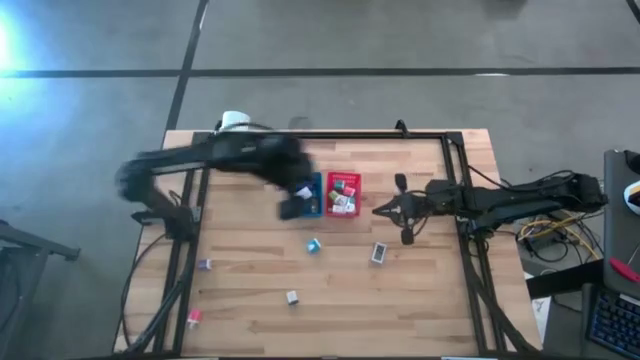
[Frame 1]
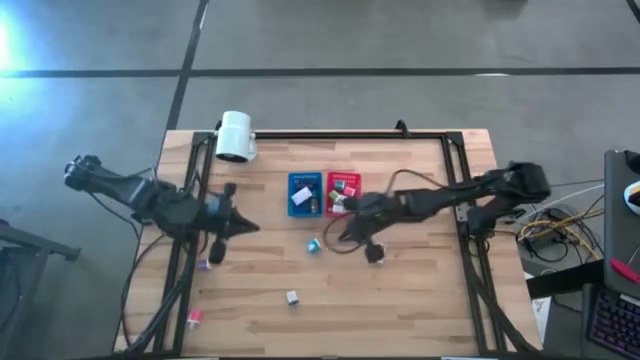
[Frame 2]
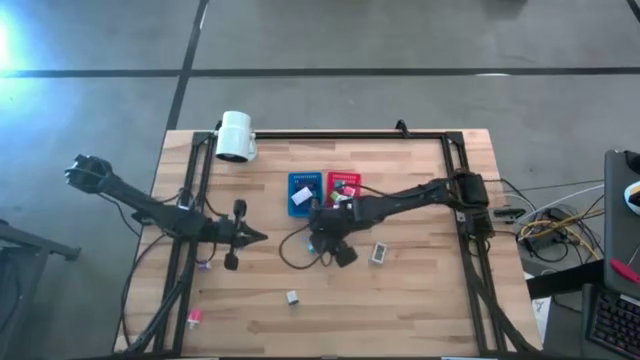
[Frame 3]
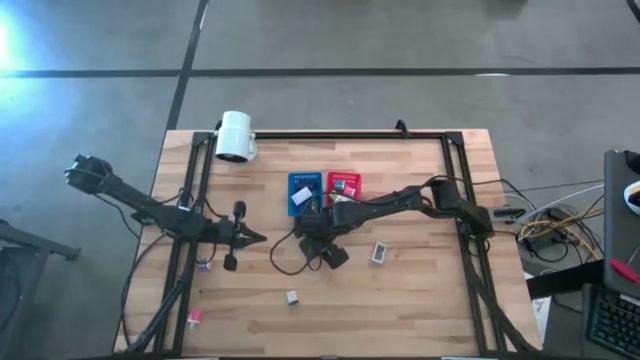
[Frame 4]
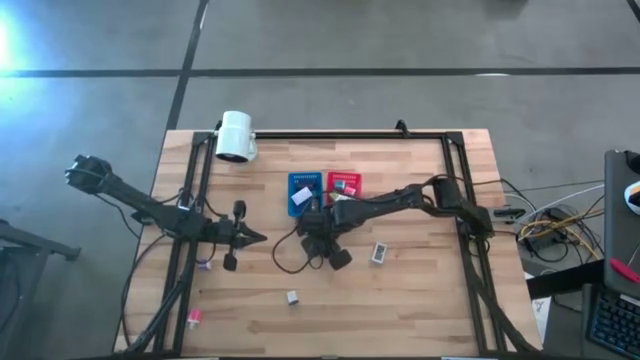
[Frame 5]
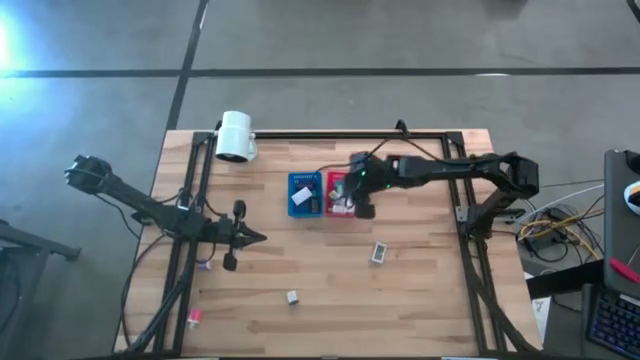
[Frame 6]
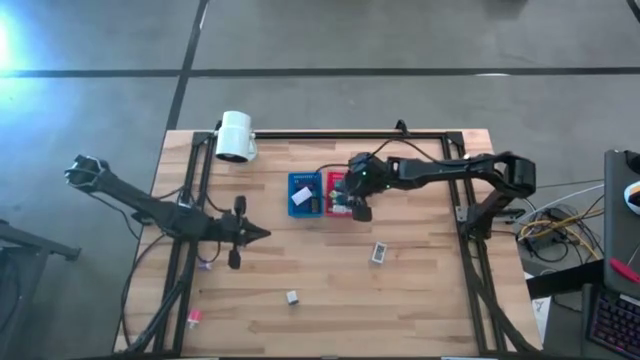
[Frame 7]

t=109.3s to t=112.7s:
Task: Pick & Place Office items
Put the light blue charger adapter into the red bin

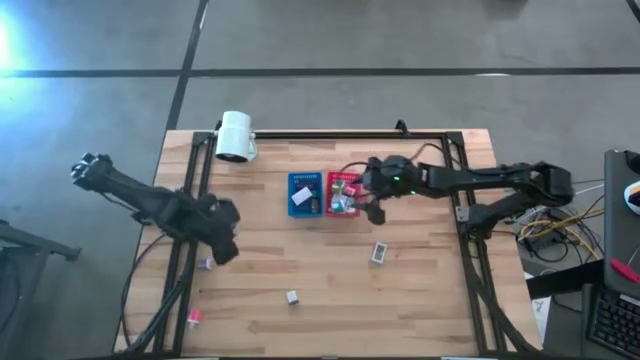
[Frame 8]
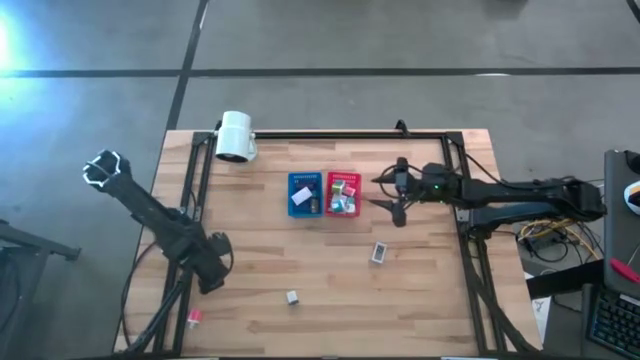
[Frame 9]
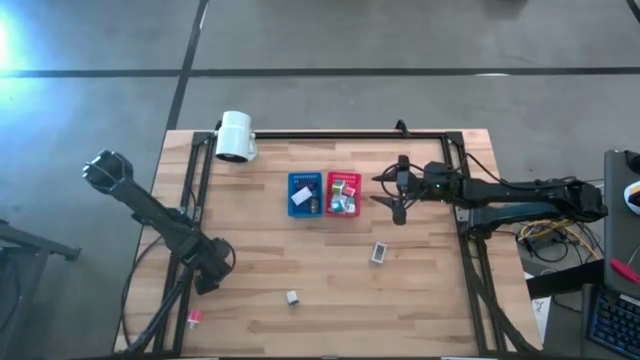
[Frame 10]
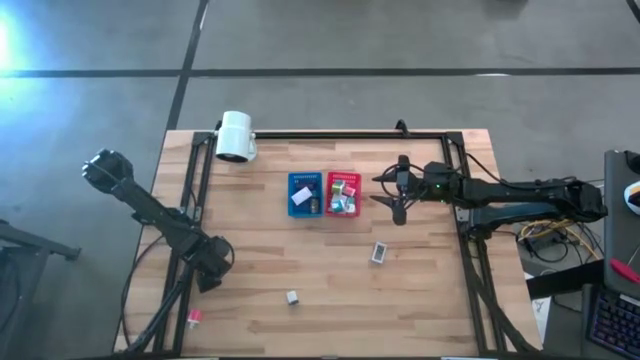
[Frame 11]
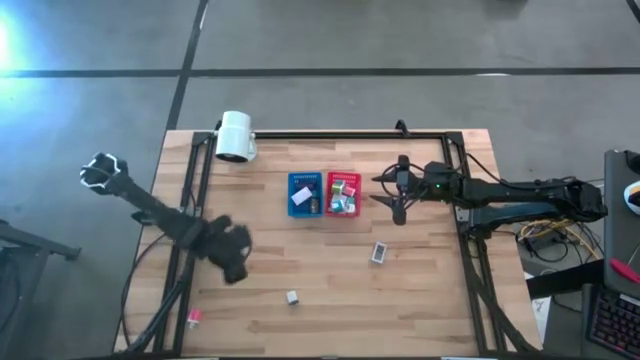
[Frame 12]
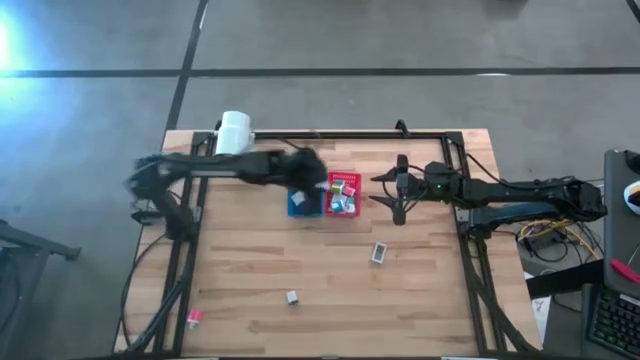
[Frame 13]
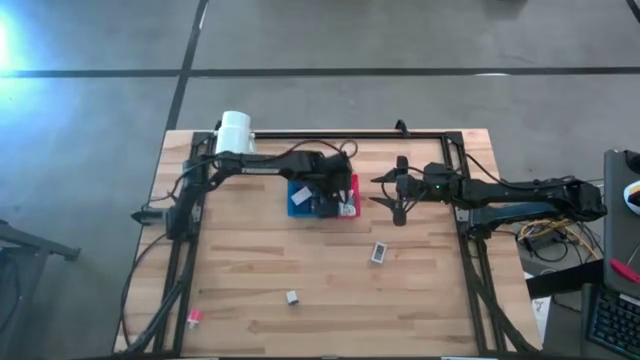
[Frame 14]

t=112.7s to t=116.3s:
Put the dark blue charger adapter into the blue bin

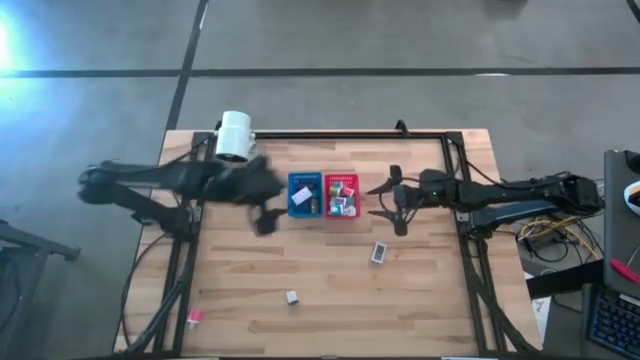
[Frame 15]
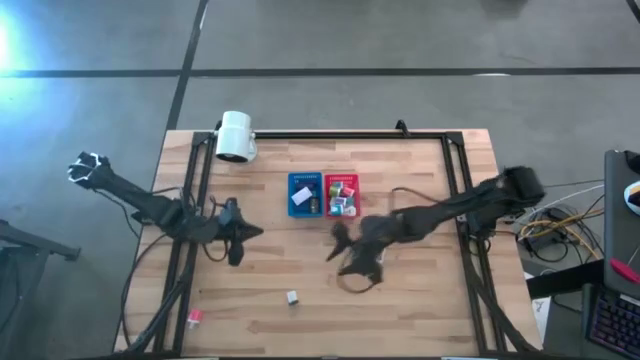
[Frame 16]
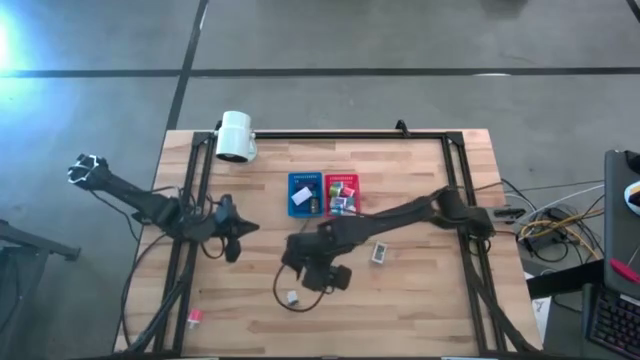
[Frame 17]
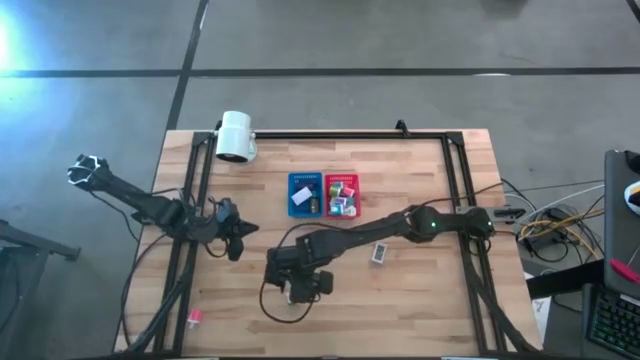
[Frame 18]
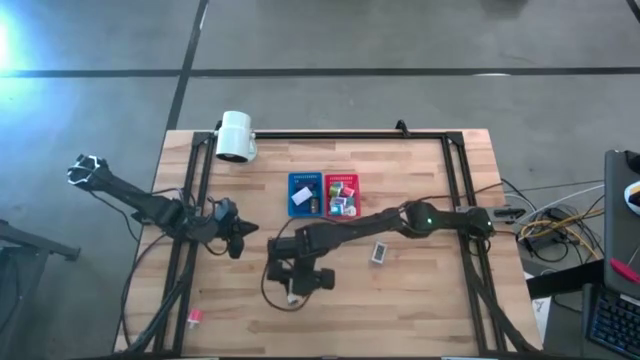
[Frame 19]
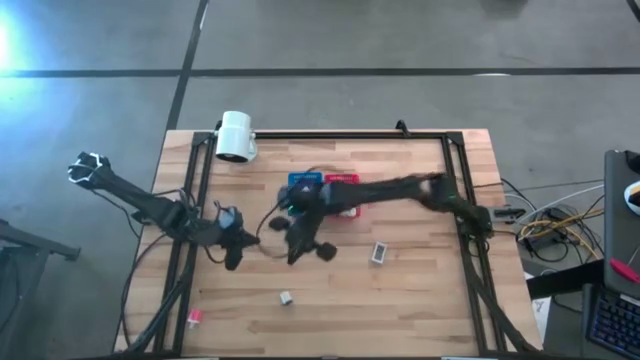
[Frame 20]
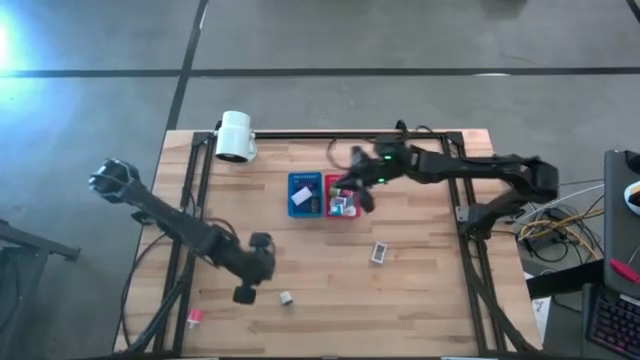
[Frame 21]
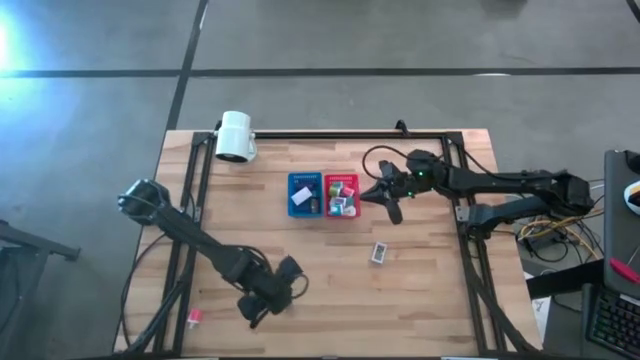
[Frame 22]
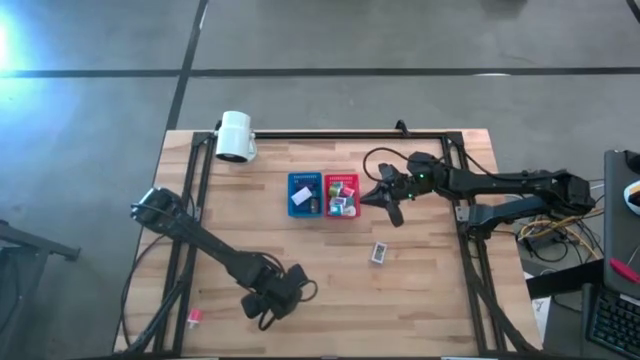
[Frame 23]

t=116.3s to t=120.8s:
Put the white and black charger adapter into the red bin

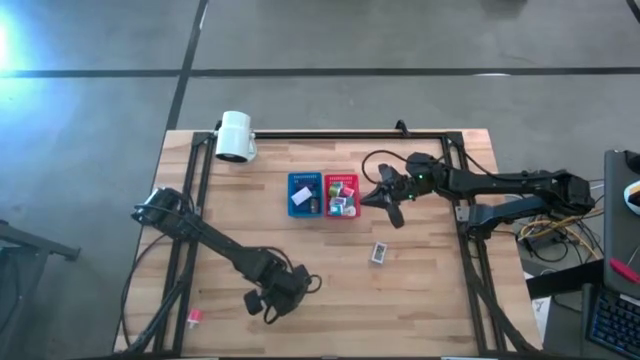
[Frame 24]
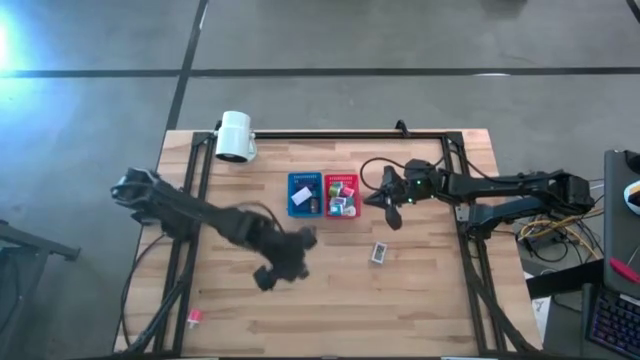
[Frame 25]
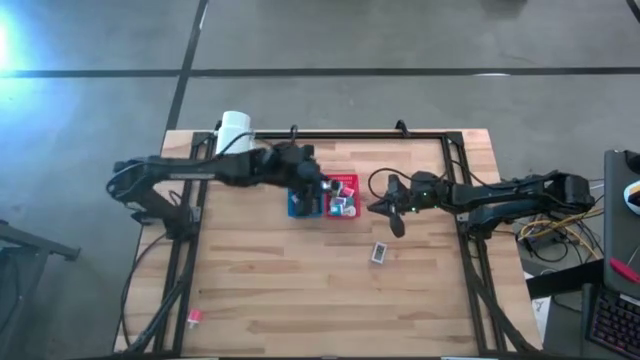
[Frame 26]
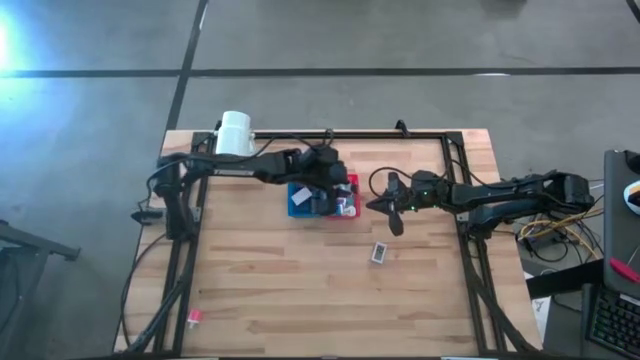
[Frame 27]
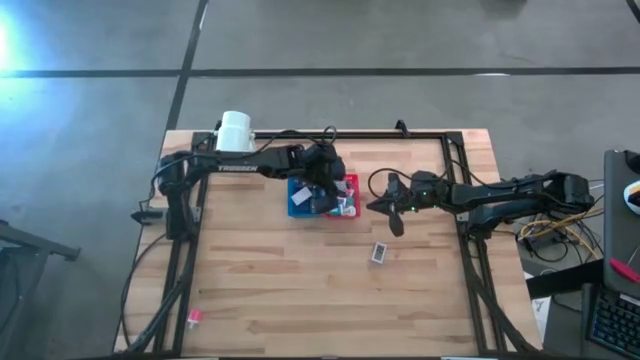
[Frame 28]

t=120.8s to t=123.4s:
Put the white and black charger adapter into the red bin

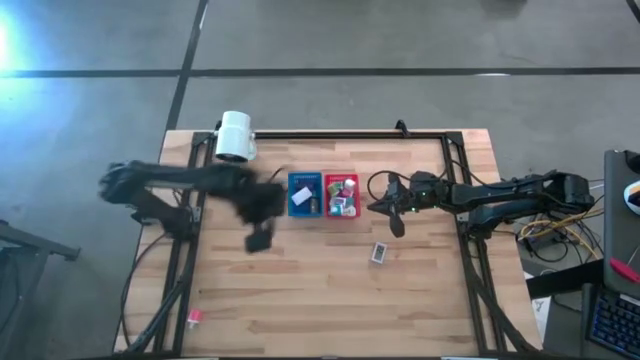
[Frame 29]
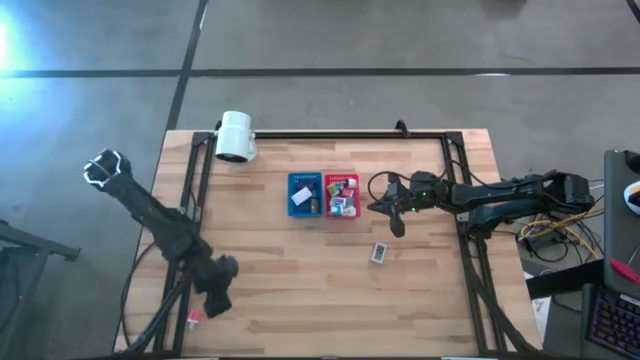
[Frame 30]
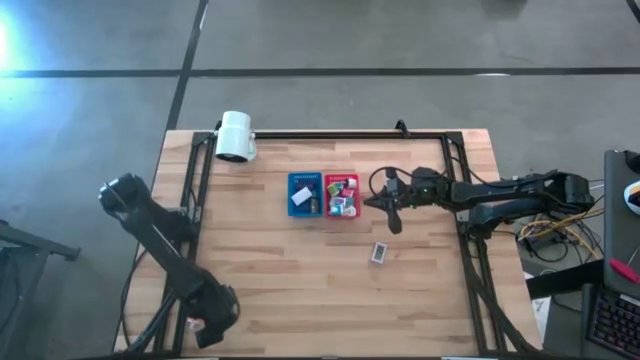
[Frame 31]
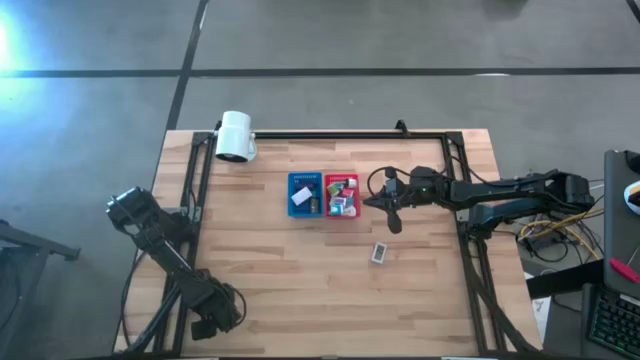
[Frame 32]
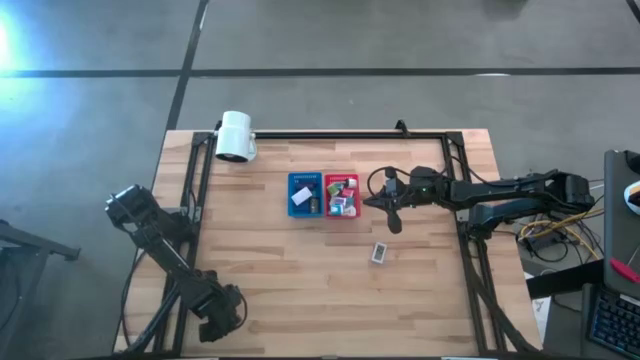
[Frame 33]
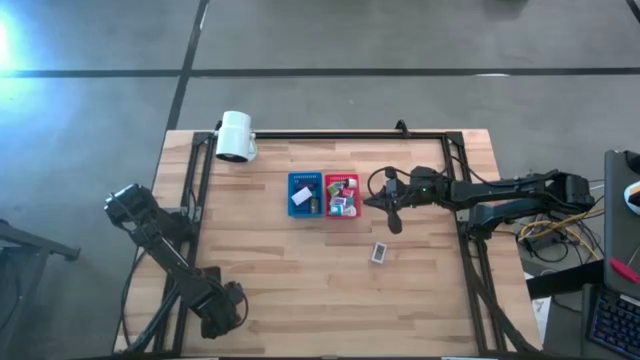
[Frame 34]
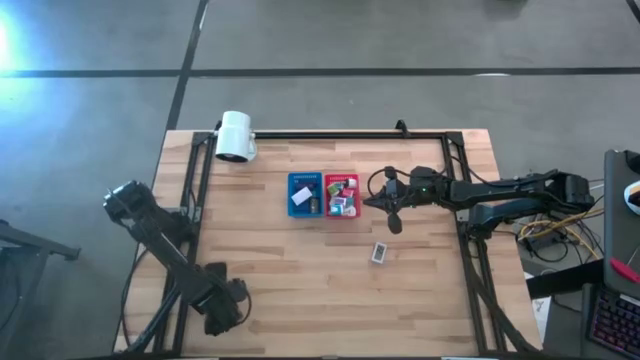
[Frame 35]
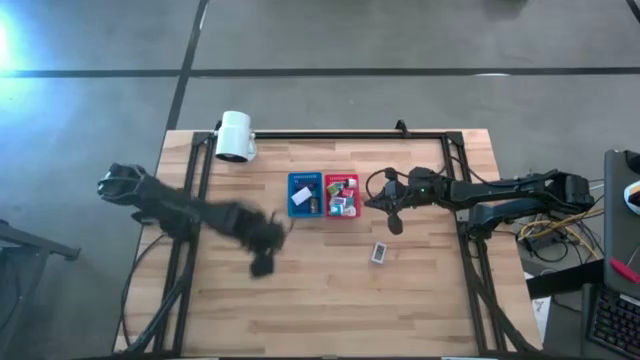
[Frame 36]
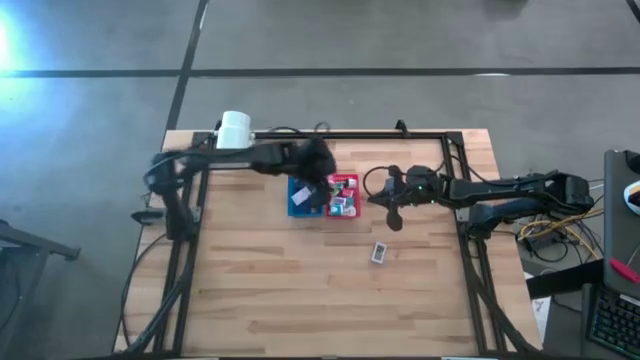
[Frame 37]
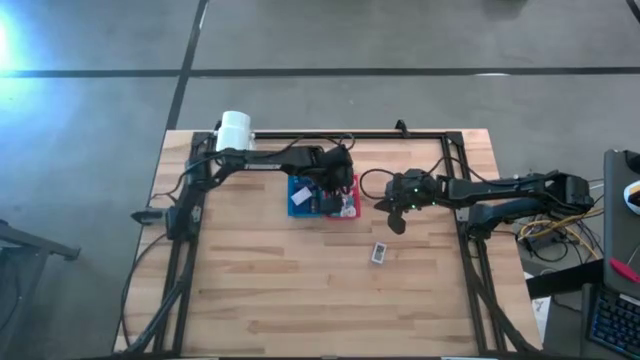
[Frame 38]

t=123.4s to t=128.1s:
Put the pink charger adapter into the red bin

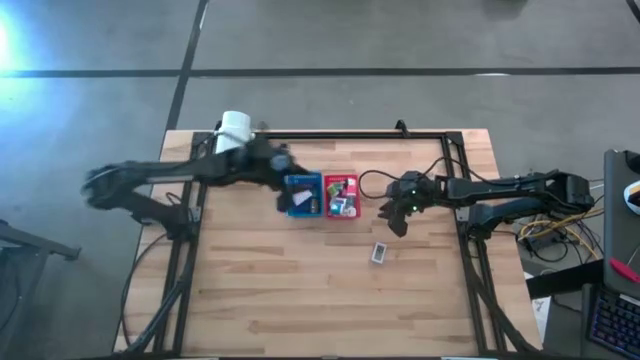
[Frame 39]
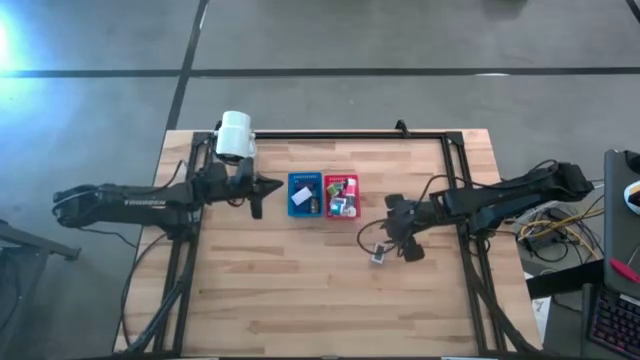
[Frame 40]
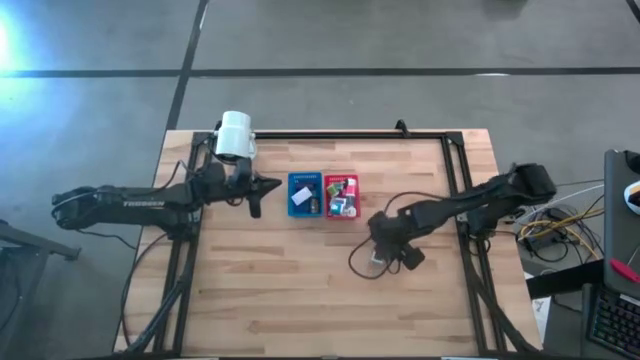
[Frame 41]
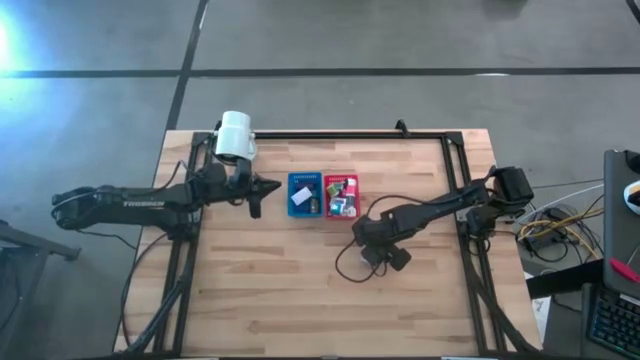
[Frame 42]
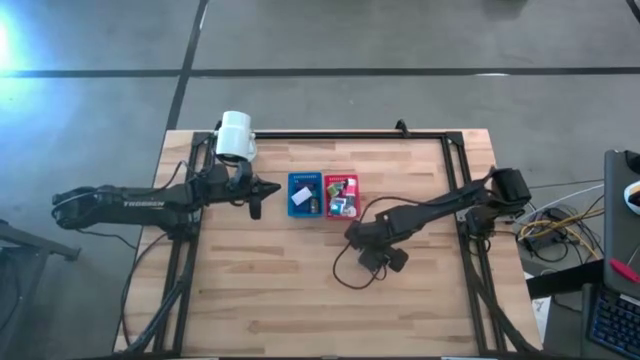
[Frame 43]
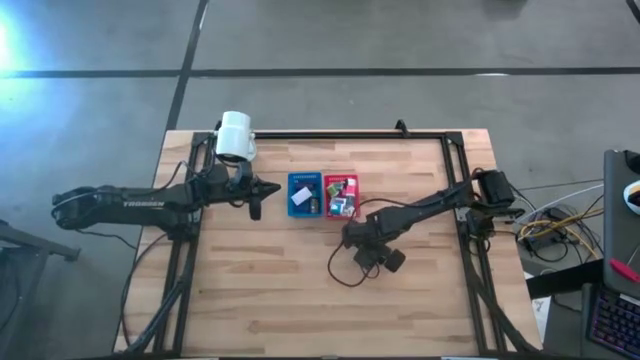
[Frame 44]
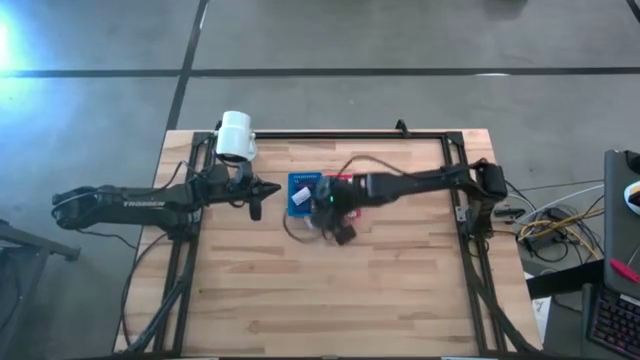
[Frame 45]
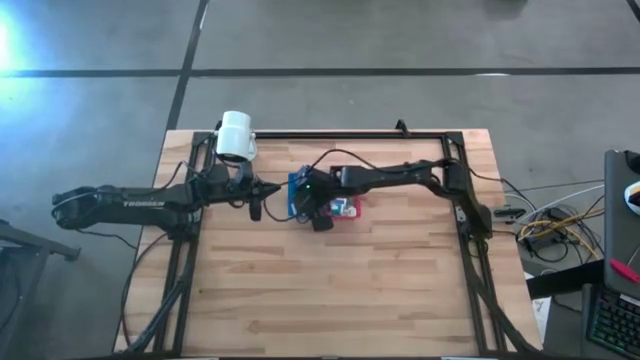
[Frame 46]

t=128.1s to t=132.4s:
Put the white digital clock into the blue bin
